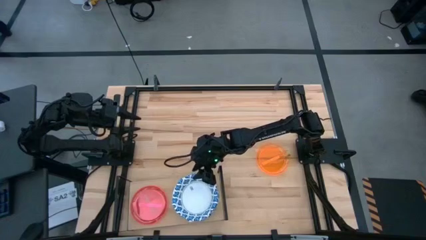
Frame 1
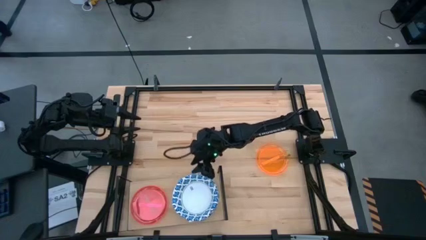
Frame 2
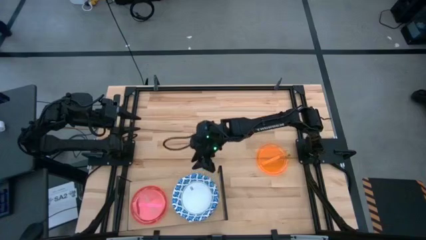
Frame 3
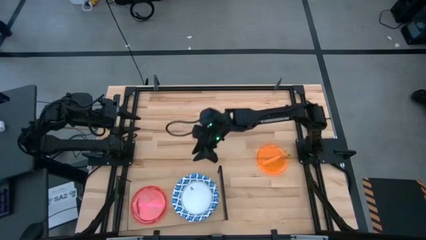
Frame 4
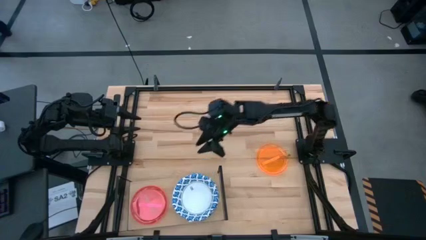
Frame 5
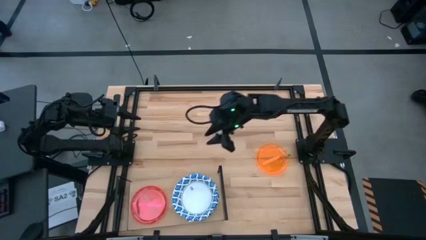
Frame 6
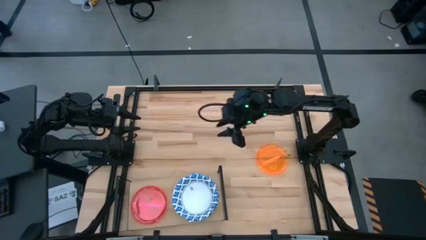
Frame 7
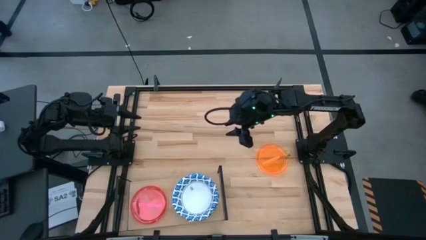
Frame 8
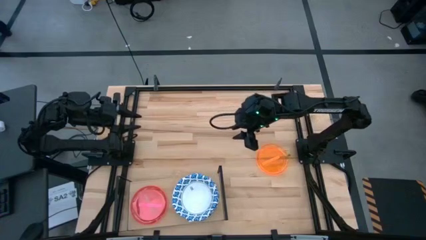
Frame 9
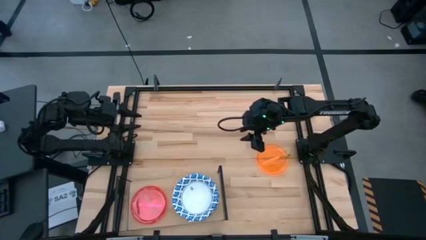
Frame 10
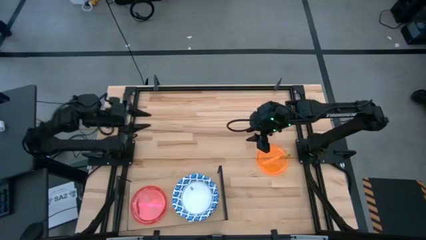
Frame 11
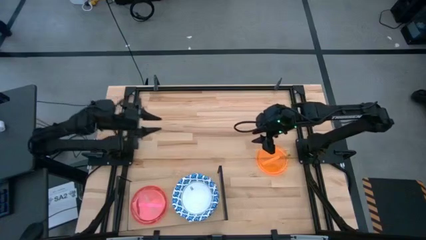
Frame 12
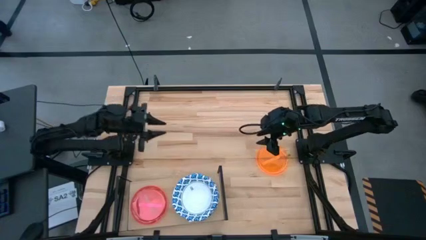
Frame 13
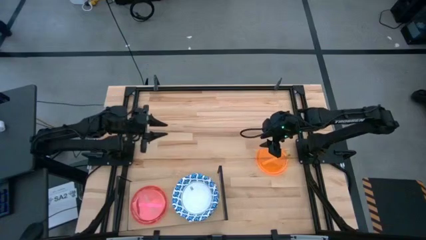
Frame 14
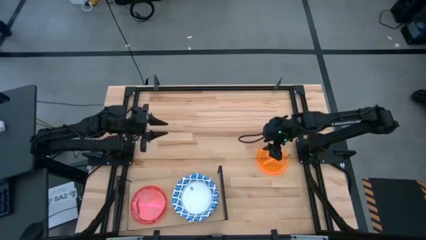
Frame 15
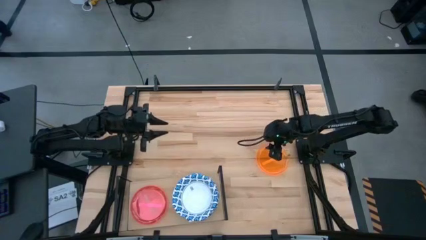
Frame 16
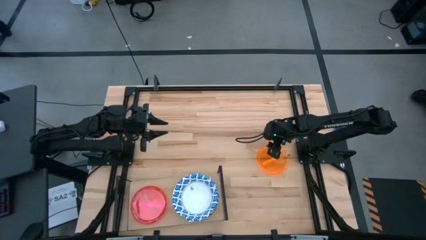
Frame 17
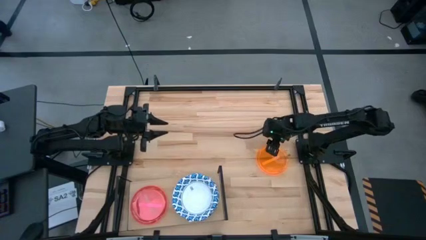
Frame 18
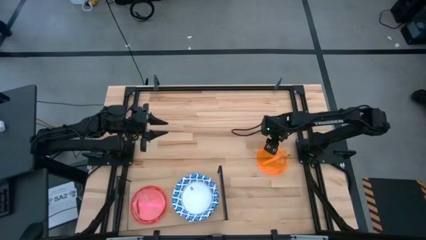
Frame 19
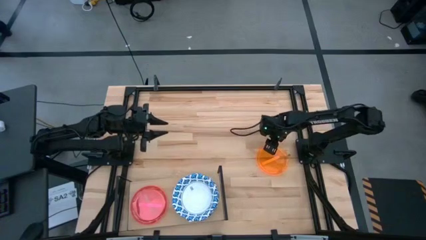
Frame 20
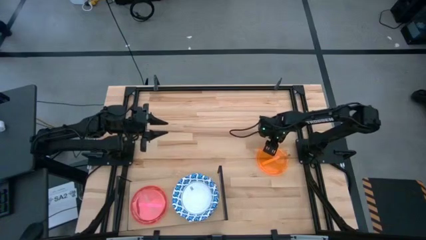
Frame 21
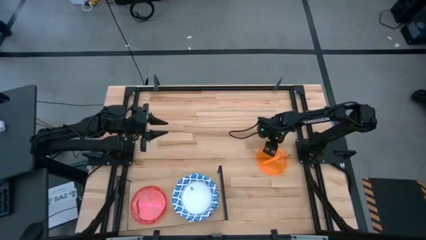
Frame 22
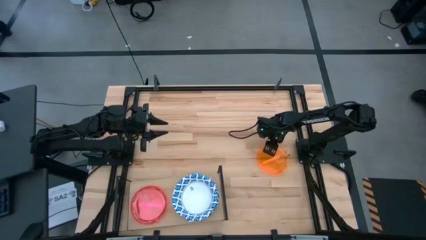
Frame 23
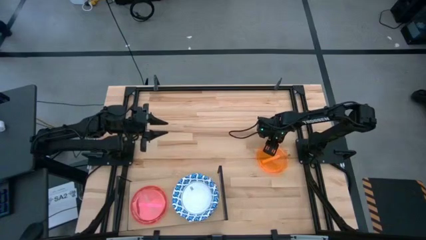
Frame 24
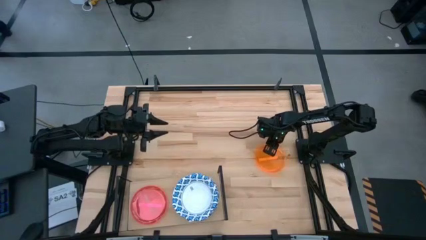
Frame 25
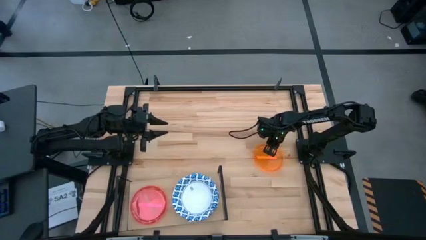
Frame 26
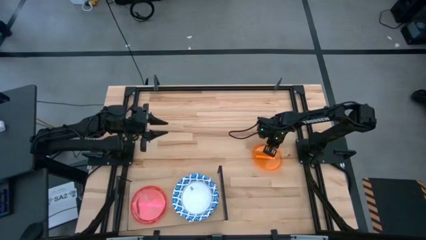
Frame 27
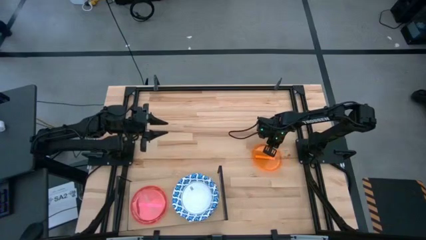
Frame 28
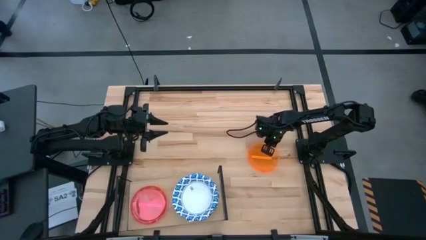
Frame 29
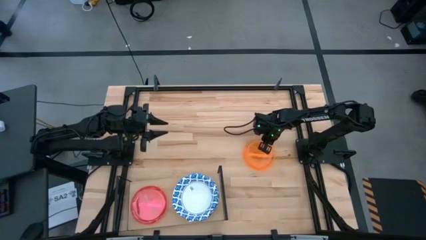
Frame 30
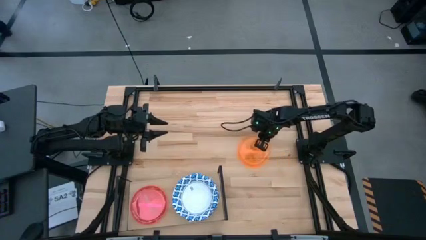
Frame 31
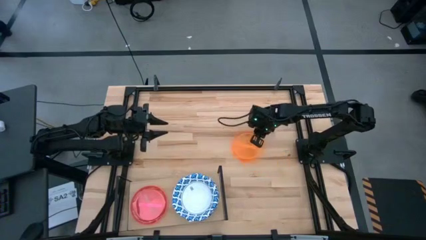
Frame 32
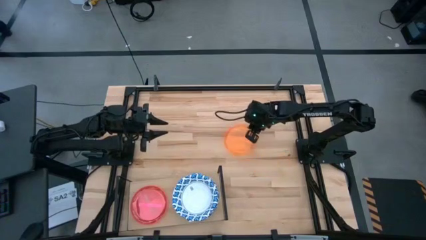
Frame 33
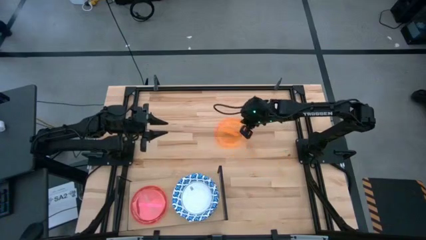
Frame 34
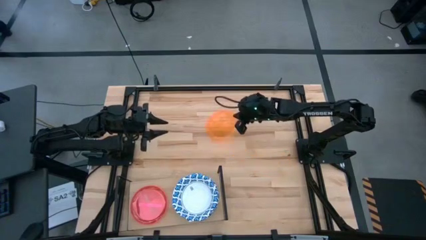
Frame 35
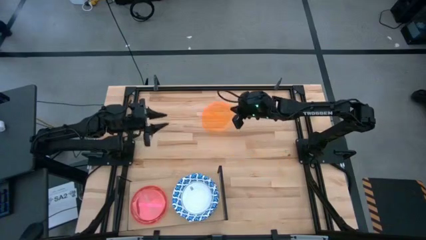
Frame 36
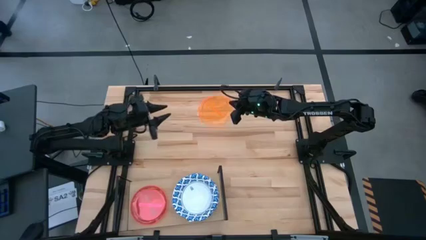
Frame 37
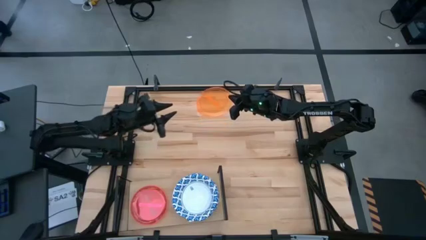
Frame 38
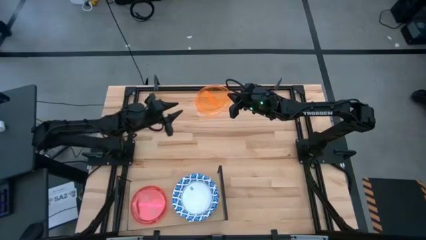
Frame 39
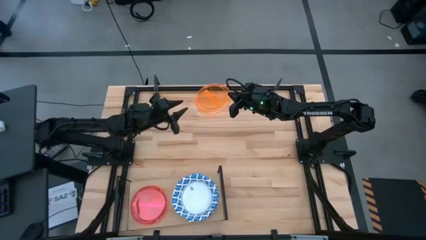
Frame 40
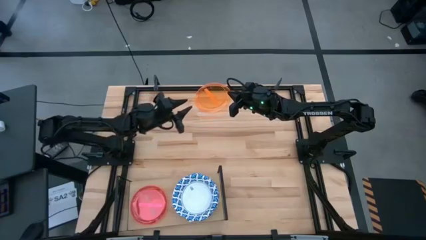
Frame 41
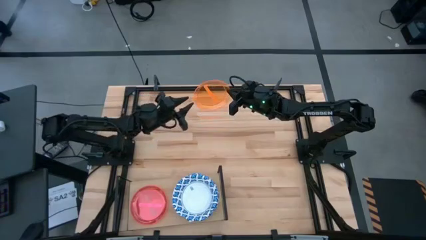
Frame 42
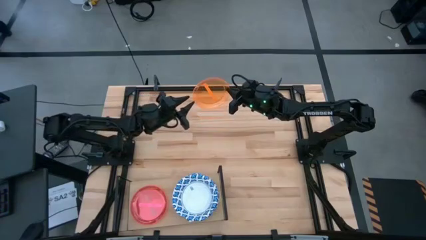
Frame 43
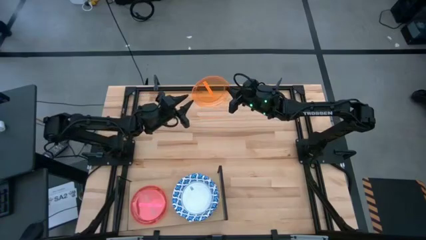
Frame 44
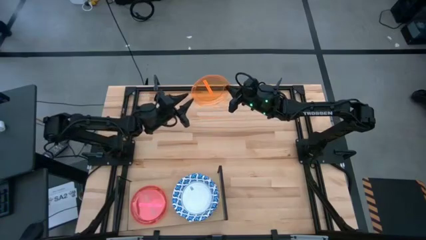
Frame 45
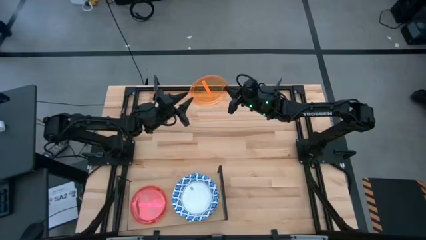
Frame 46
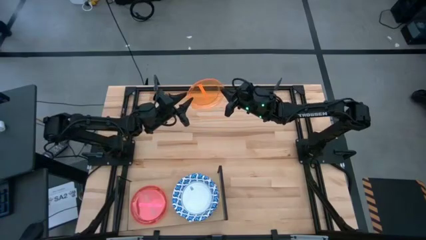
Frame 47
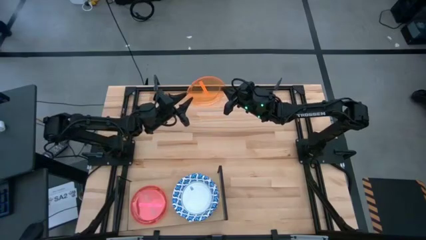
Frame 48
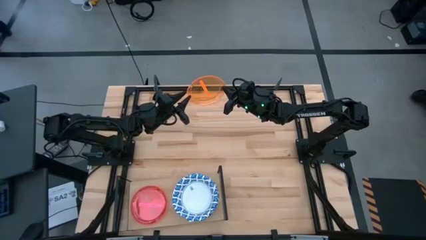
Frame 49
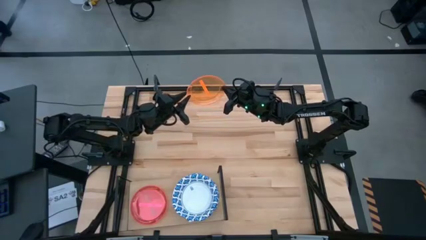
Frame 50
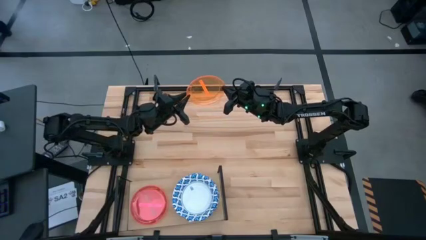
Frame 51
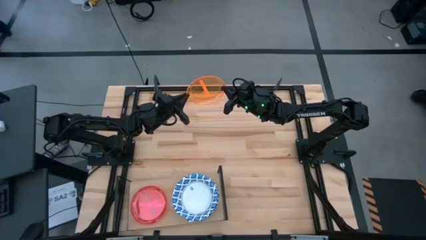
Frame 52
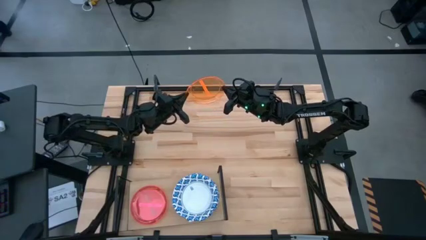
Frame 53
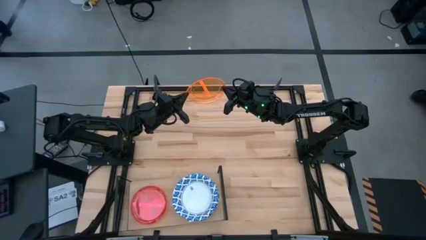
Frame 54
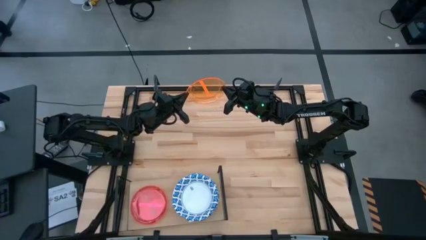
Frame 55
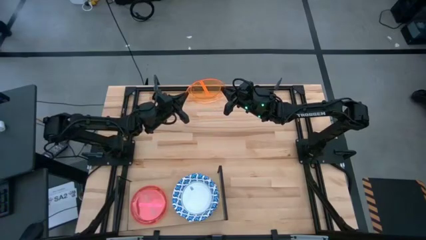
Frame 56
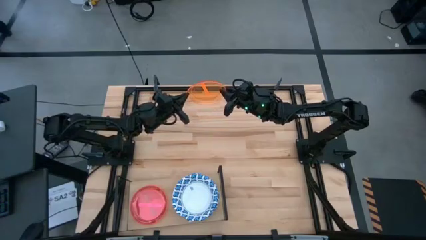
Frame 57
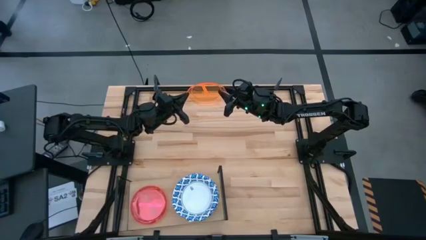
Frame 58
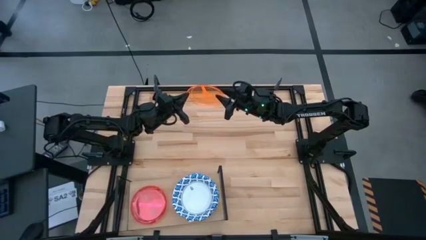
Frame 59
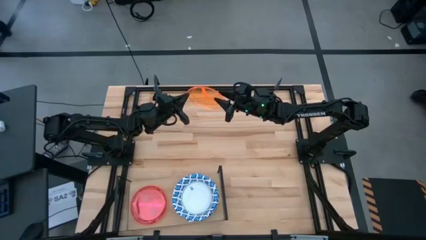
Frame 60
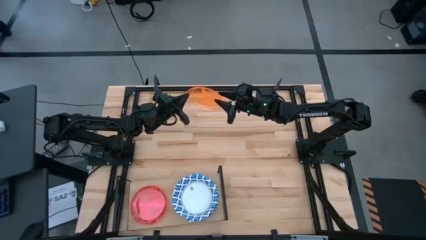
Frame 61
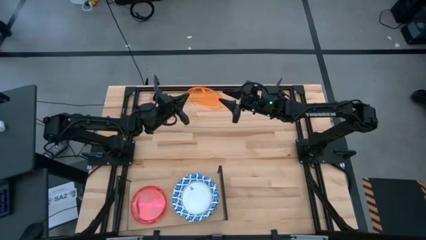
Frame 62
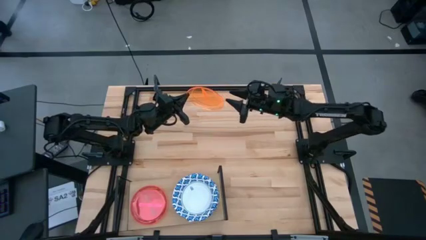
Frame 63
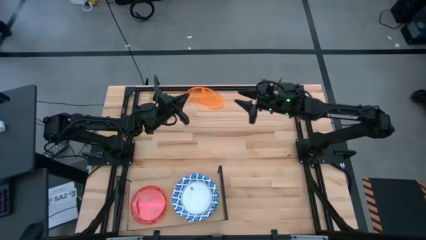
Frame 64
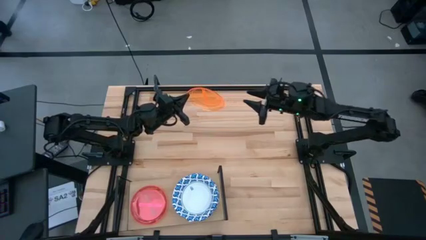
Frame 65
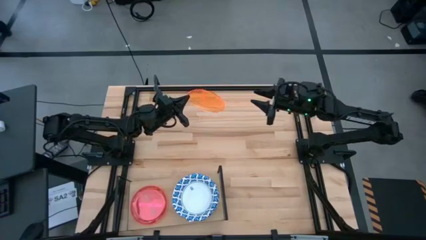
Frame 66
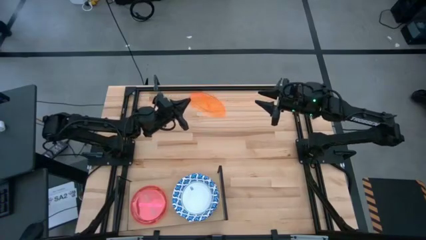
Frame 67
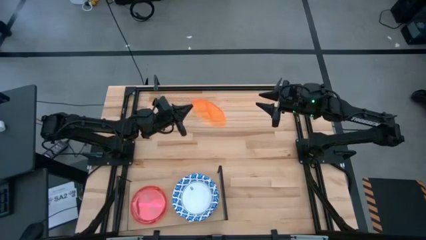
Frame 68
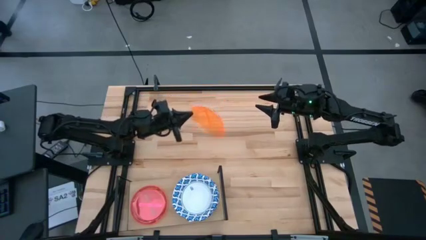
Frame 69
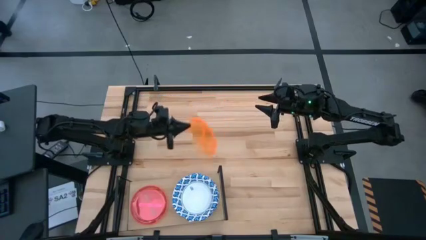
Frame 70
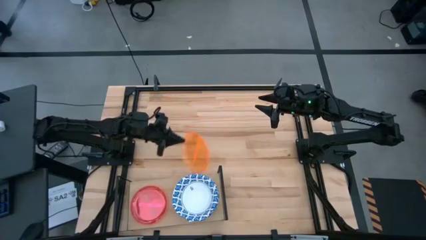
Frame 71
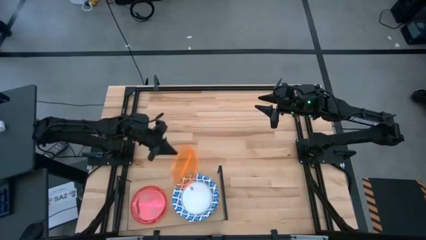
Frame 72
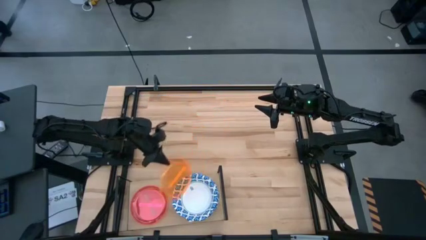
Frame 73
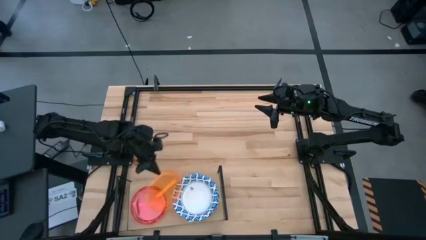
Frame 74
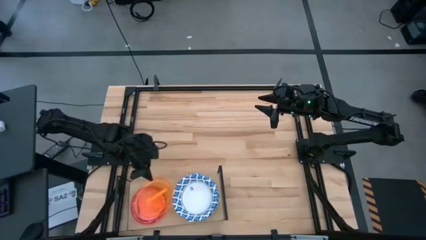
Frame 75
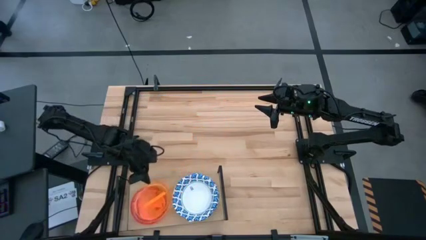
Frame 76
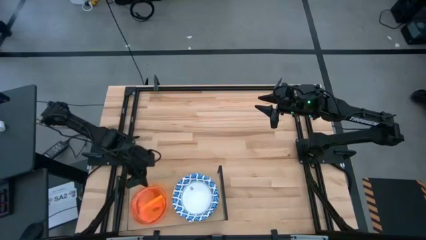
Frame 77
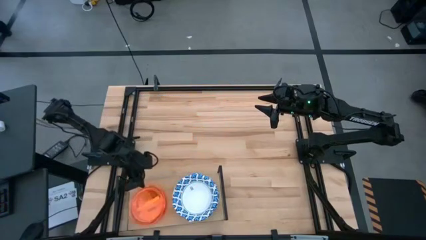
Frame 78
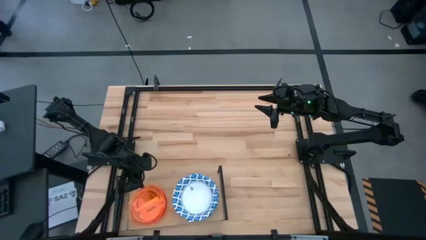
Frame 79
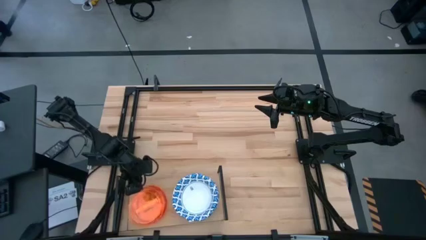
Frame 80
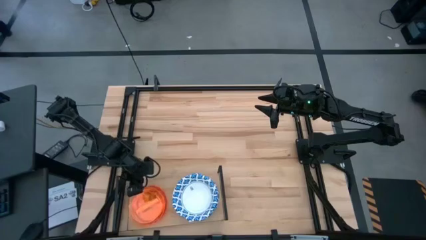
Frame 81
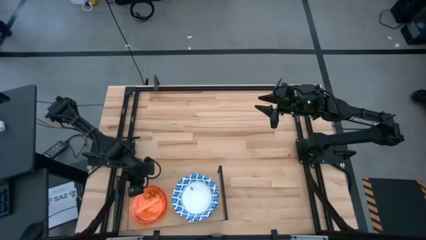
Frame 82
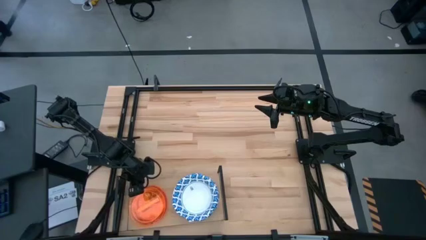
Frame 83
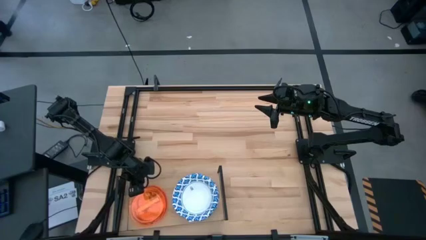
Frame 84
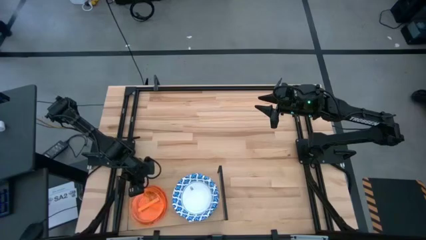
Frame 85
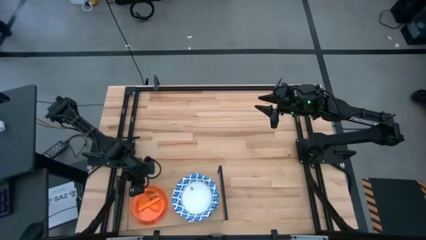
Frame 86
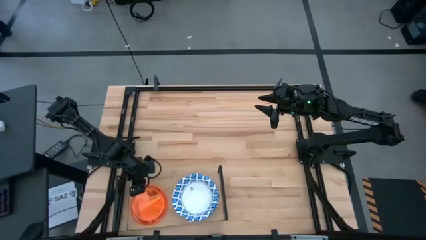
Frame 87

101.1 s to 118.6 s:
Task: Place and stack plates onto a shelf
Stack the orange plate on top of the pink plate on the shelf
